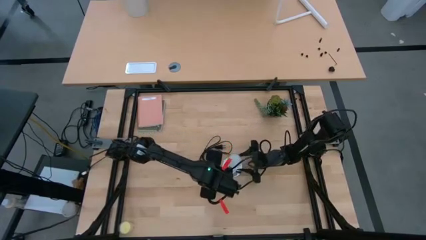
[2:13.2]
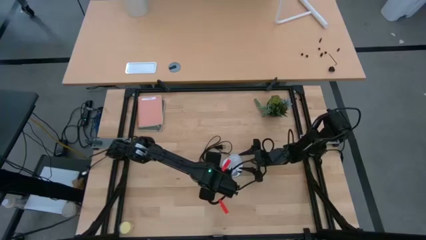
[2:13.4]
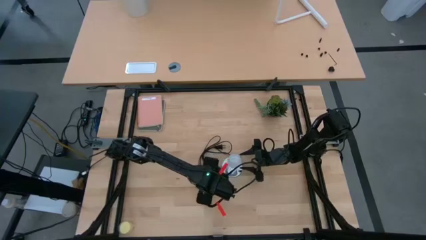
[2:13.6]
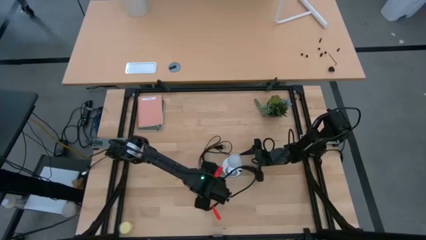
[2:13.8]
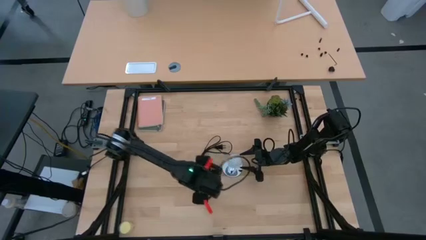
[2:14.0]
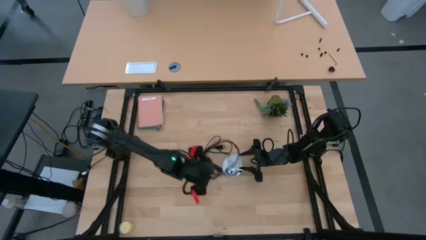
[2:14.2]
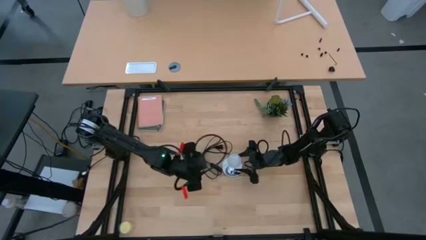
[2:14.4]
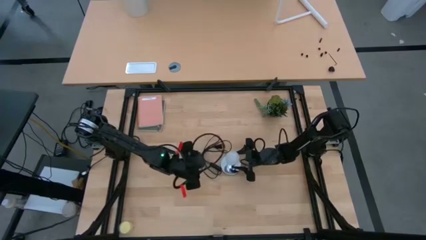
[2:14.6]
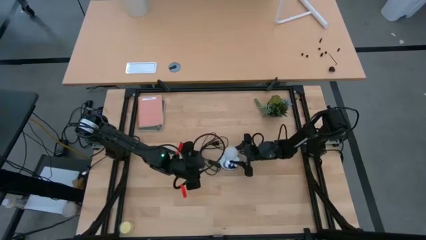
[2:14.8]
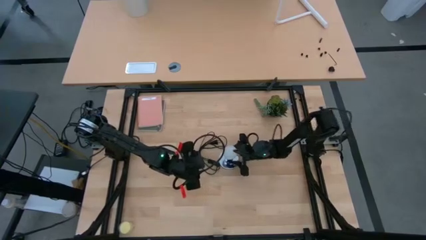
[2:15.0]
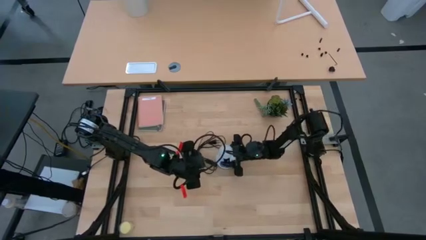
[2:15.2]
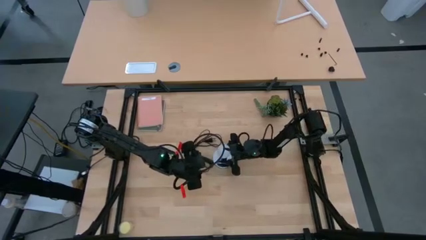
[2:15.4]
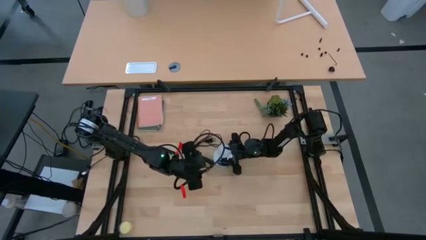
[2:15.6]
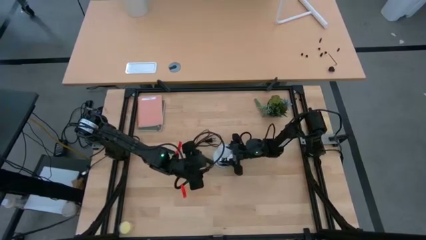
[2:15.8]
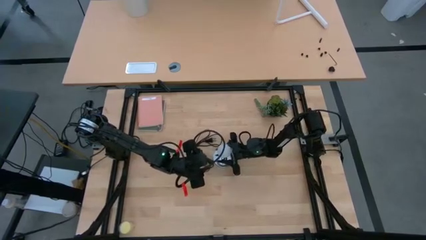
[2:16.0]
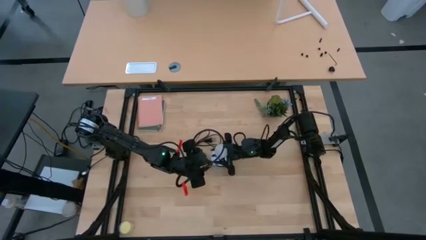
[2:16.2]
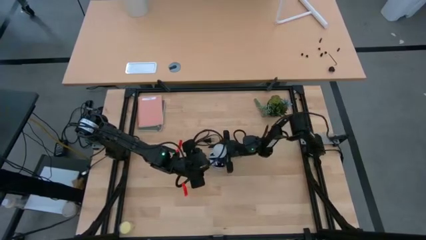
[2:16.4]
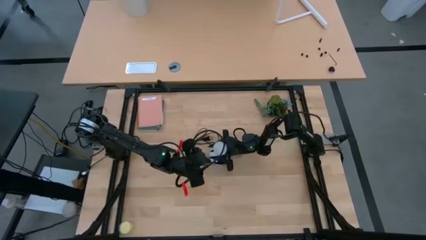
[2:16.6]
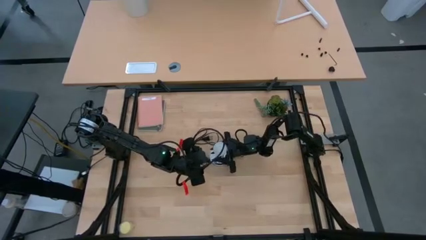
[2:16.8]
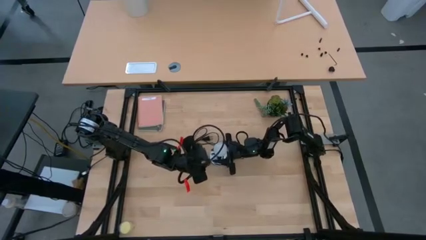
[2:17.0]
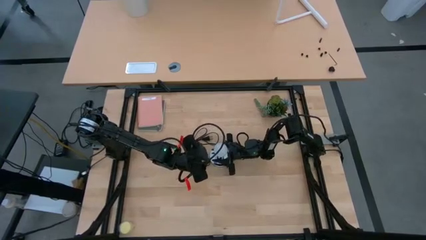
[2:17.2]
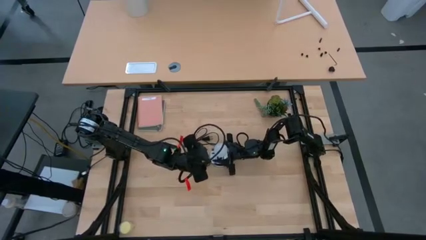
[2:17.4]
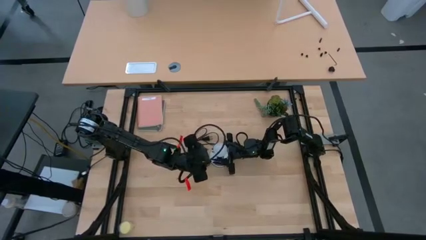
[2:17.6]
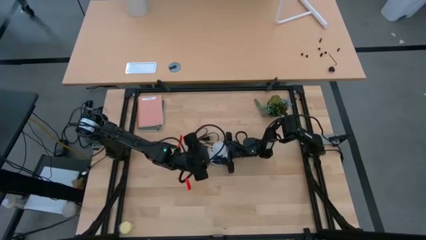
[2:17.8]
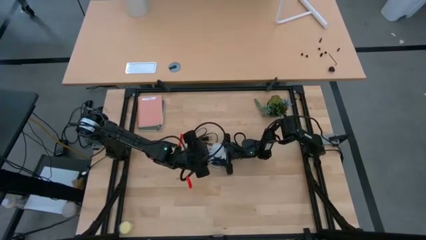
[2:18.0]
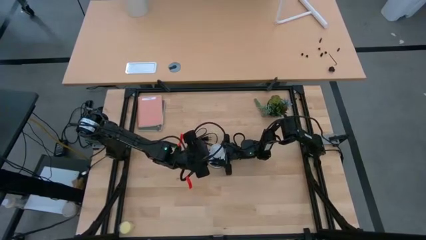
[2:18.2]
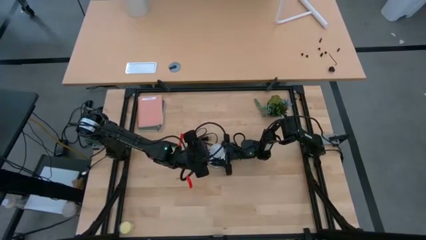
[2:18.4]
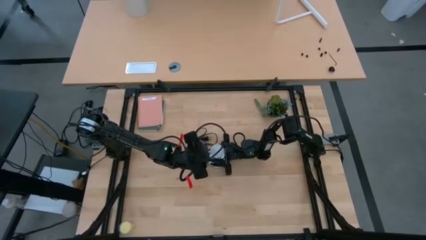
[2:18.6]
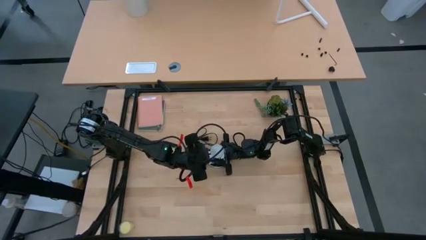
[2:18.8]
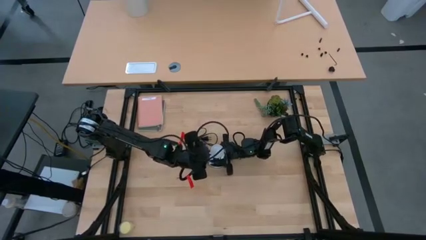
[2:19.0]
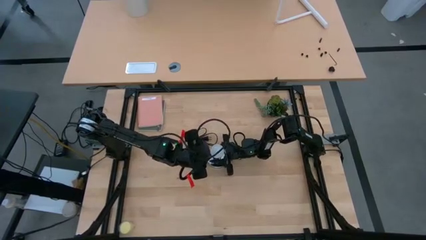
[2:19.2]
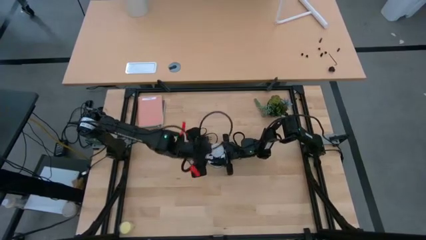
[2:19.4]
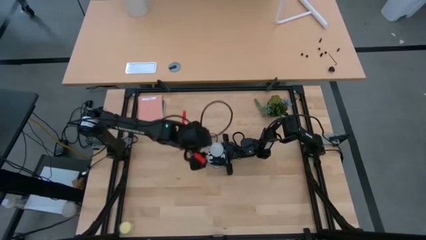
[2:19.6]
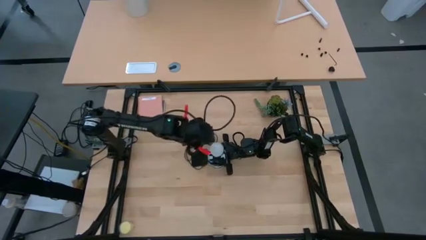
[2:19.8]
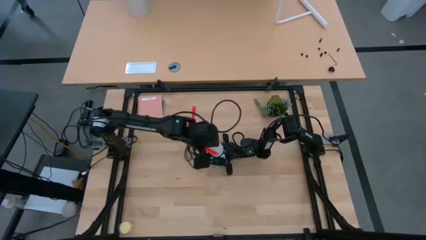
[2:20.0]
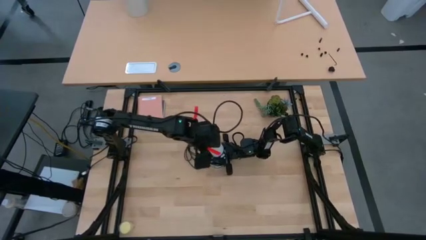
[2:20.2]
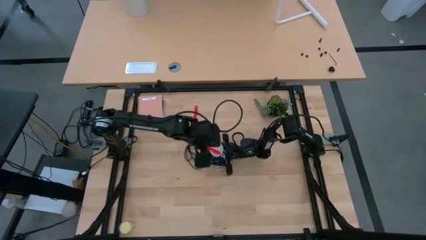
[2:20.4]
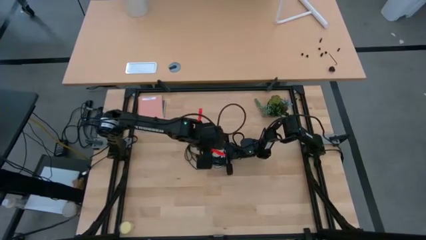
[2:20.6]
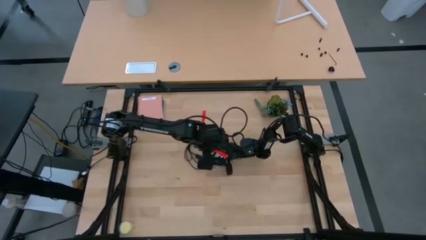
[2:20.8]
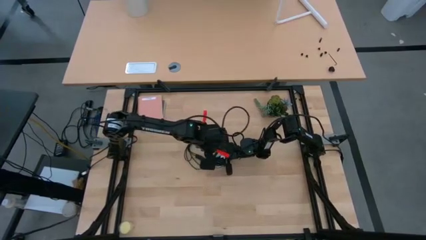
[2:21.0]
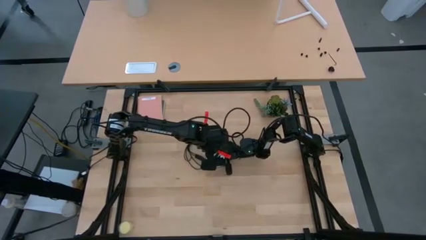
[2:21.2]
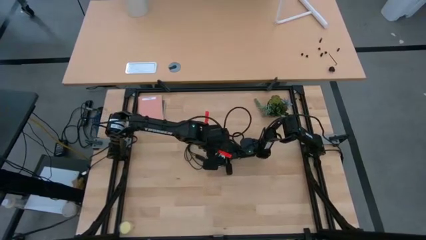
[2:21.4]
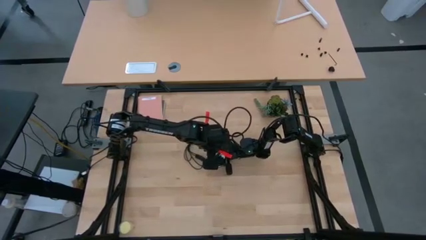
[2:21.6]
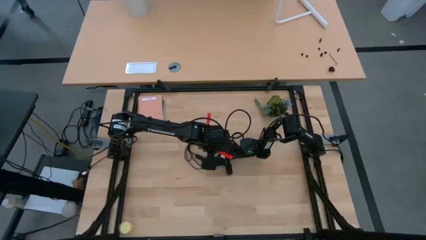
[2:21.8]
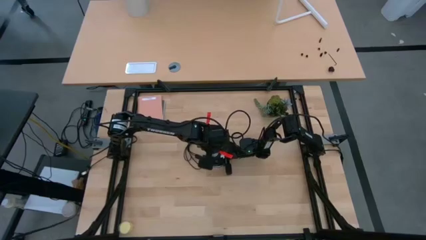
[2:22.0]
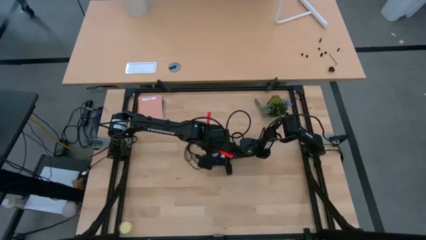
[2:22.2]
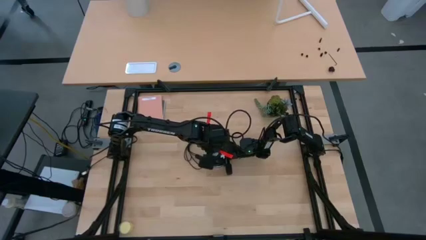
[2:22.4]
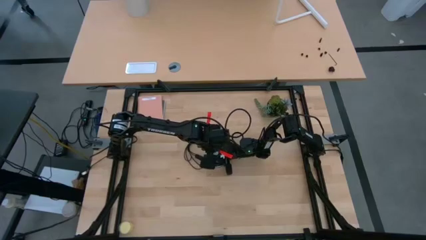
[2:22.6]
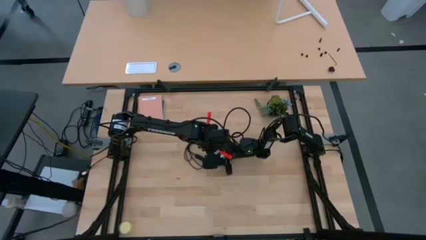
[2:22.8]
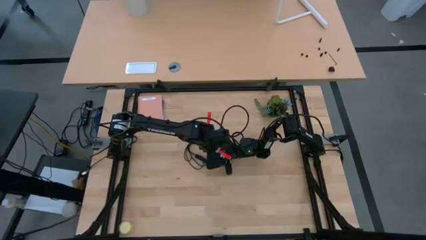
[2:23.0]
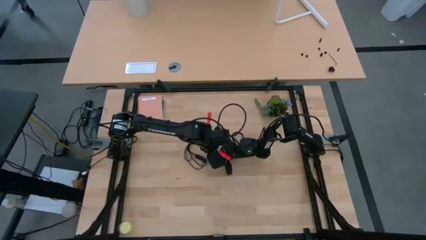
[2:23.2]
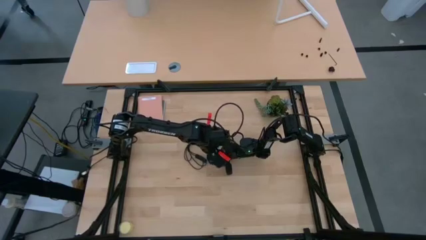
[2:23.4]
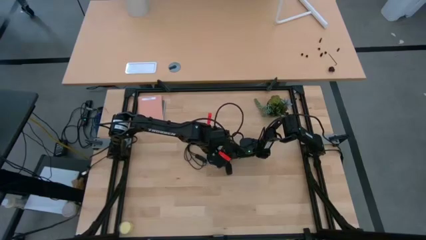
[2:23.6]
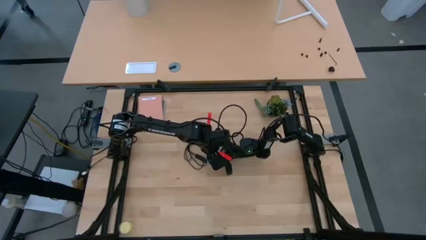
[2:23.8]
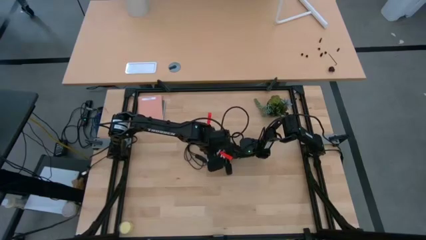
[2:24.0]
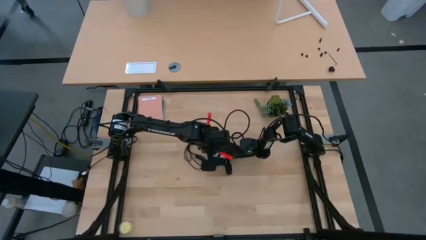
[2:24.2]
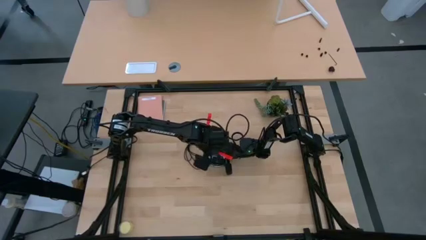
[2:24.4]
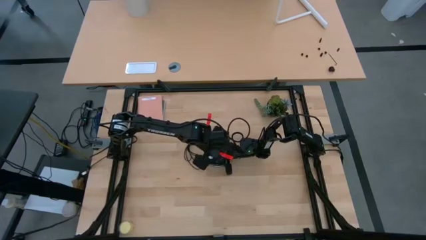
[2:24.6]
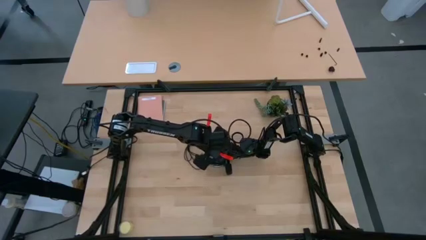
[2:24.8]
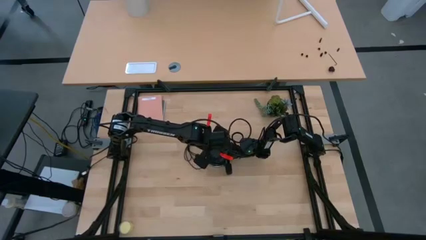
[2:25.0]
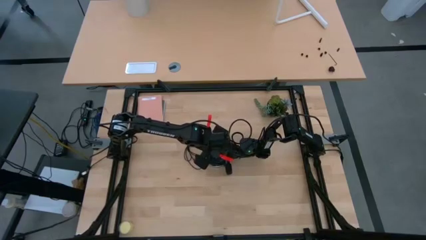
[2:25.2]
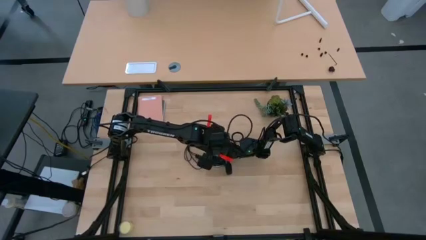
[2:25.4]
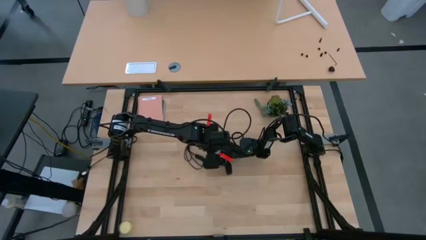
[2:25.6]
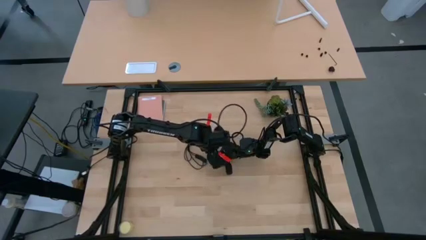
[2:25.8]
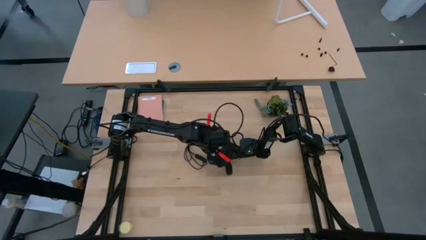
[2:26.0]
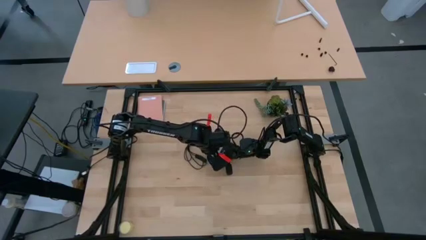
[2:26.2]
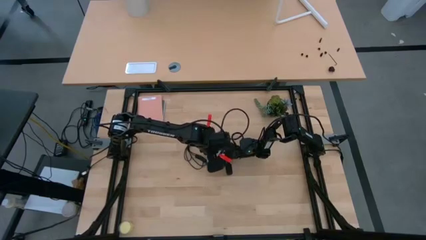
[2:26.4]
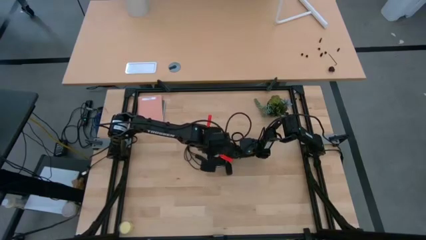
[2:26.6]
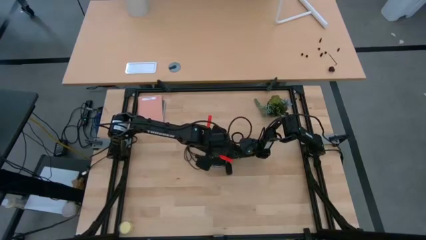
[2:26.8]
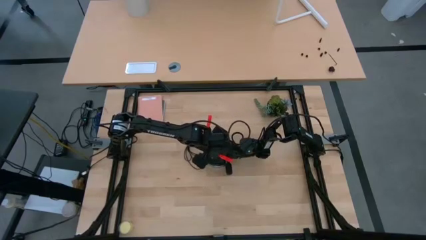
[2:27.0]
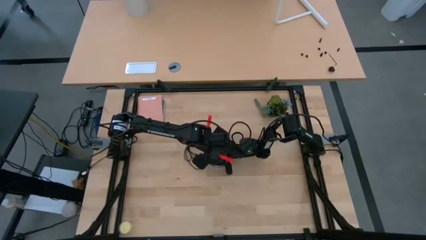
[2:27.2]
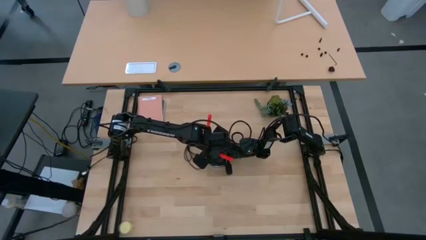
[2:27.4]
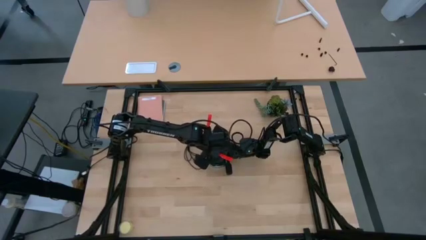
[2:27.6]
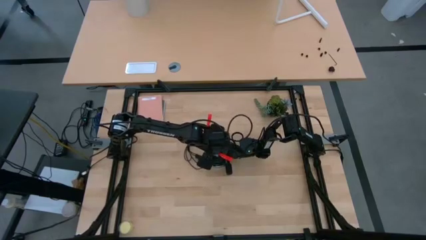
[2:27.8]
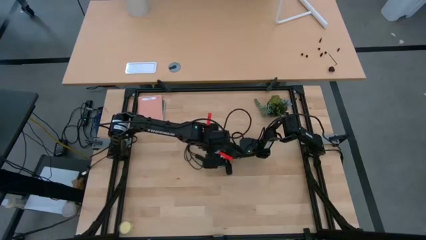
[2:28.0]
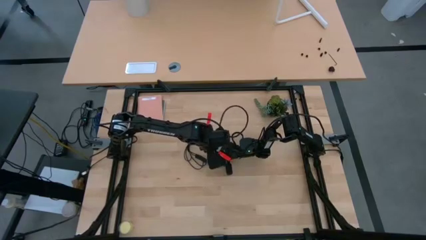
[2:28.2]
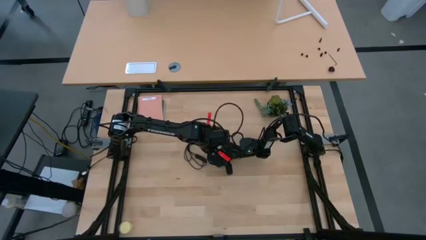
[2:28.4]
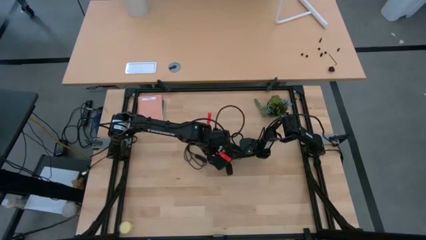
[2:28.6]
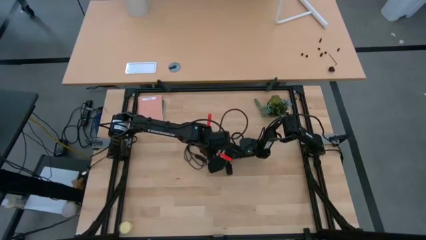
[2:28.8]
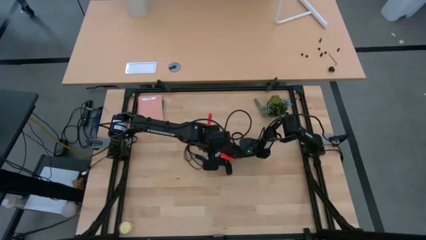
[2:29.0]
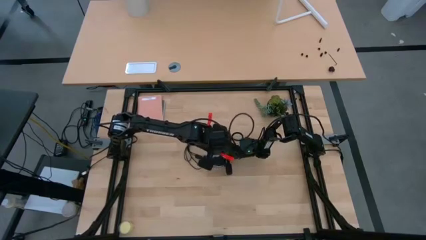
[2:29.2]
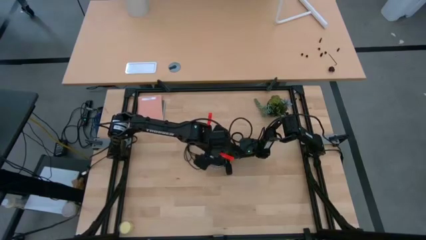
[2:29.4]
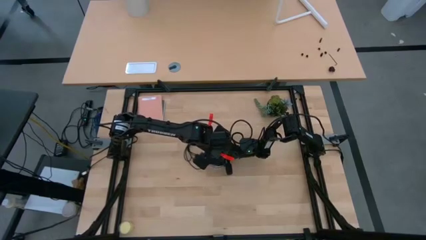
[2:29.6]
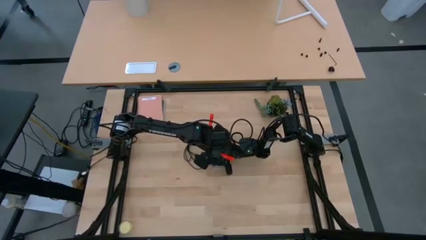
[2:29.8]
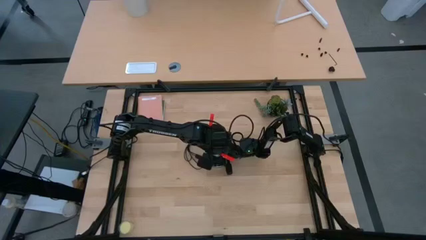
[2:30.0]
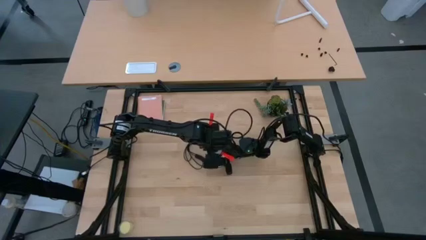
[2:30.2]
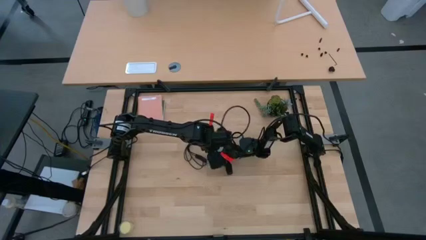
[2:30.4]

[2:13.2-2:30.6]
Task: Screw lightbulb
Remove the white lightbulb from the silver lamp
